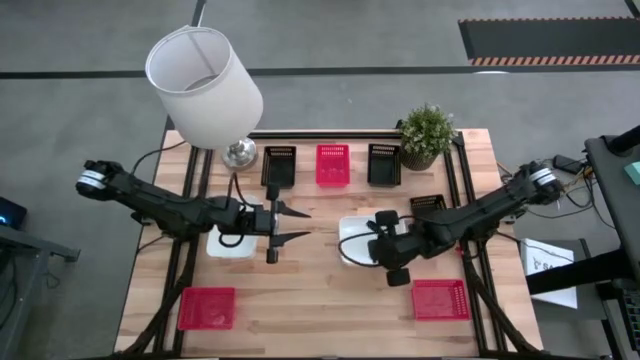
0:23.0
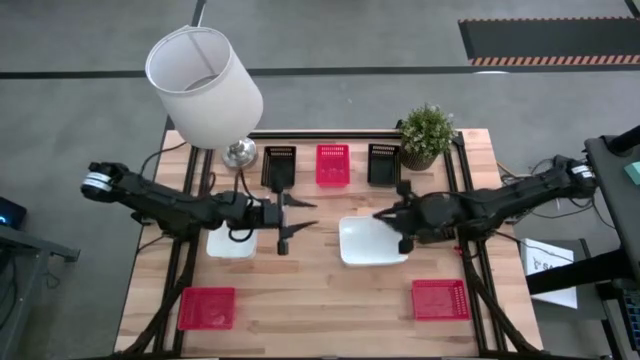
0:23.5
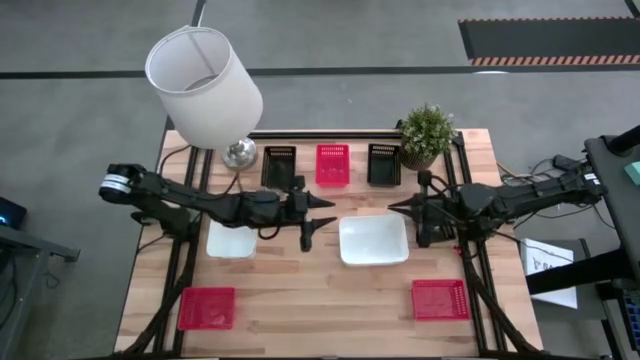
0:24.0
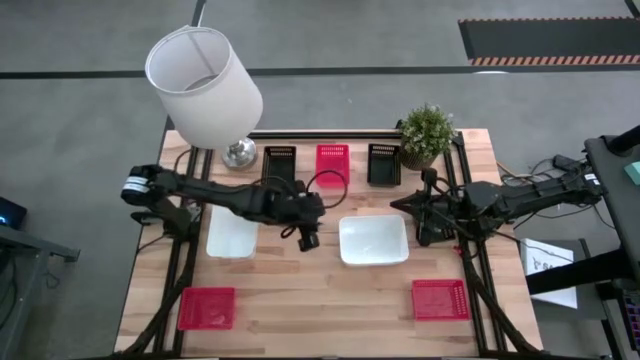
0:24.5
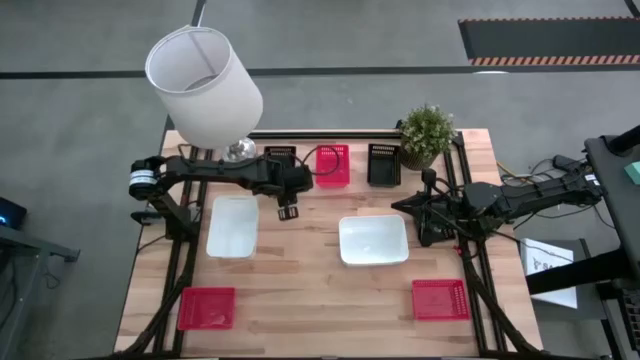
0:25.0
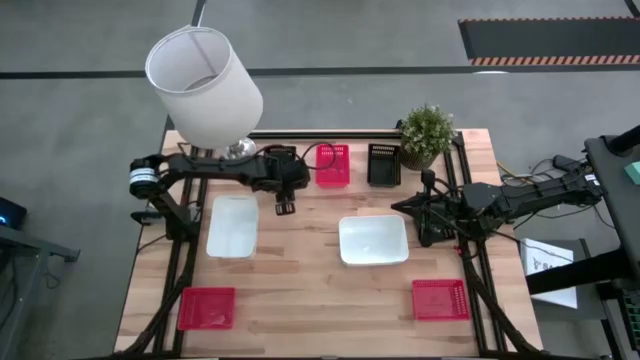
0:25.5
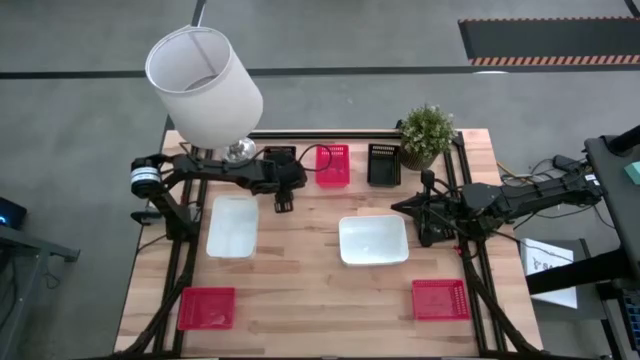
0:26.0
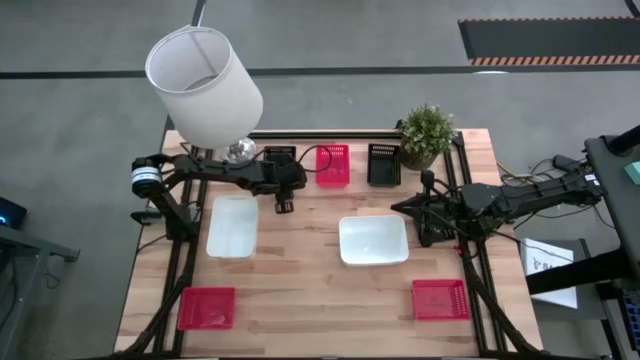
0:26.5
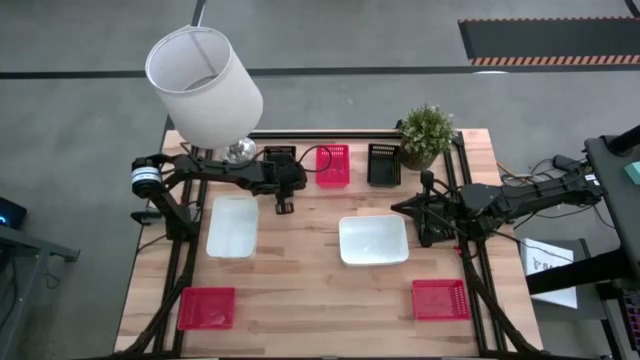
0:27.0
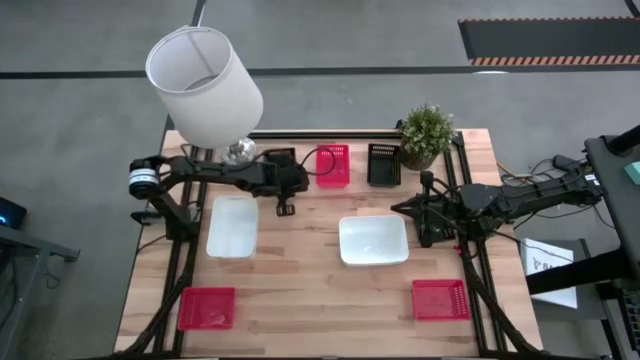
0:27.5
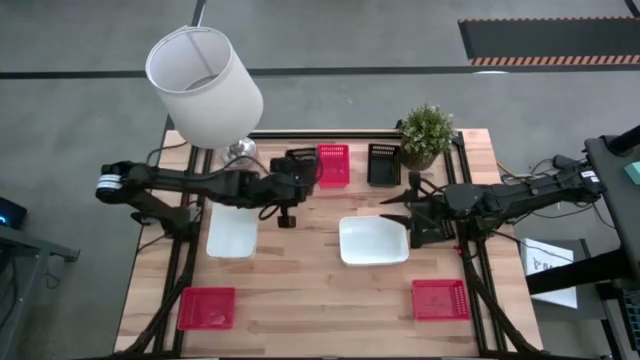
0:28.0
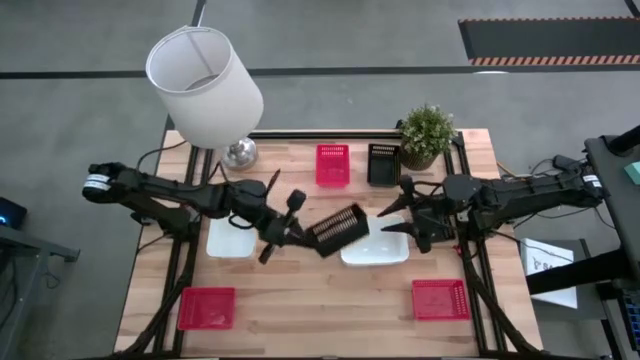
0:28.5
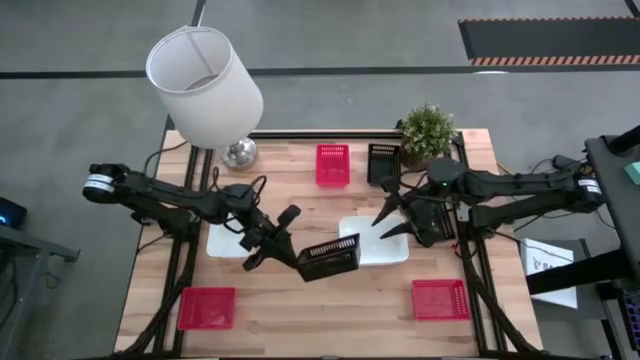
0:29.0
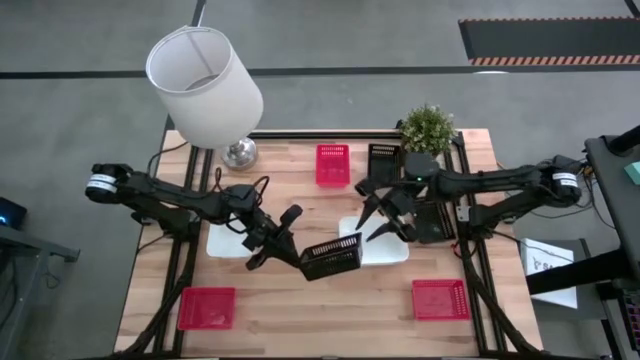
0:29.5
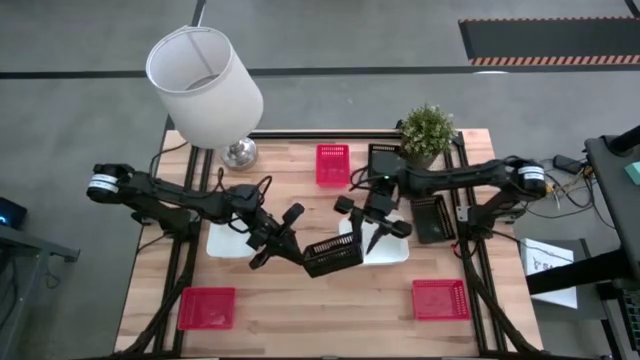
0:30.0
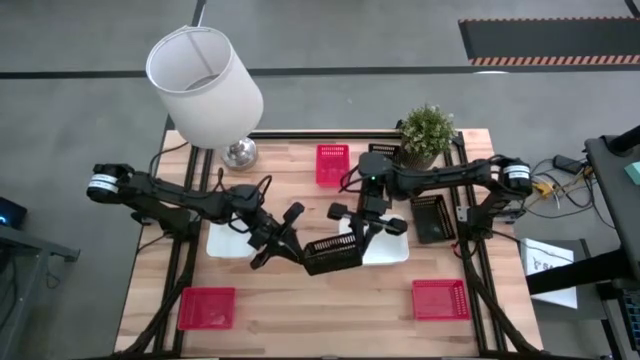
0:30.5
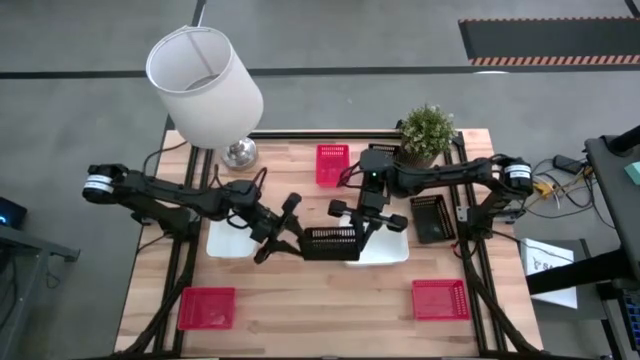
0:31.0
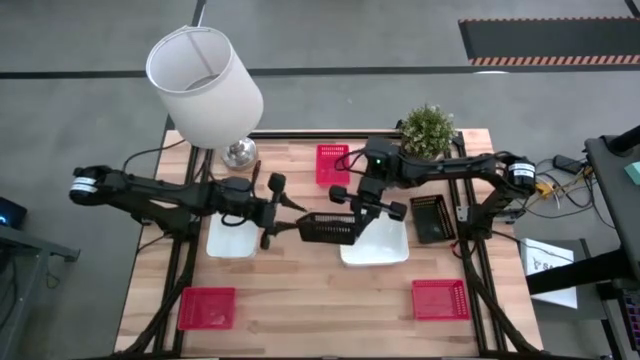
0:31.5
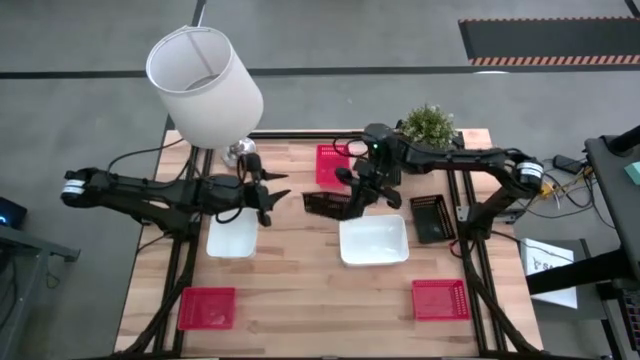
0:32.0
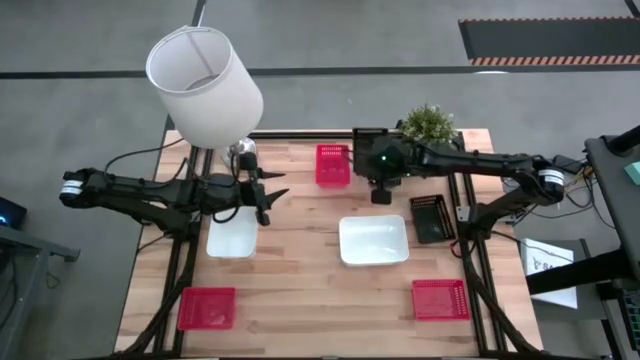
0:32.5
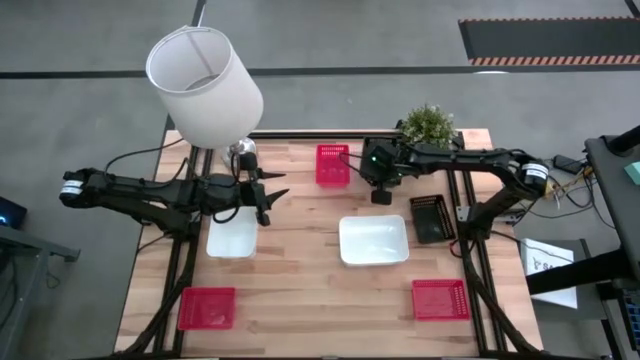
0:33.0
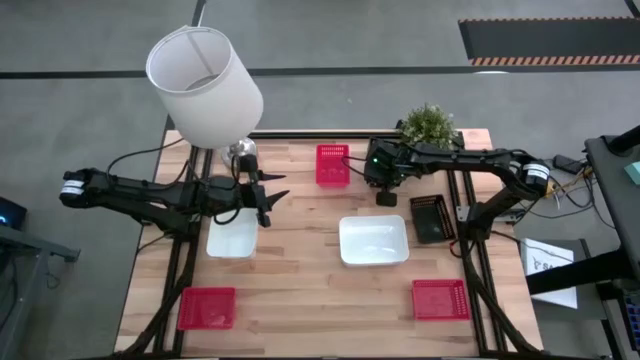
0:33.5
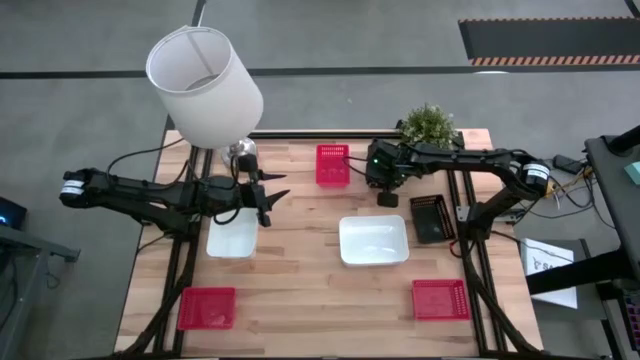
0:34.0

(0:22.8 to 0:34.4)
Stack the top left black bin into the top right black bin

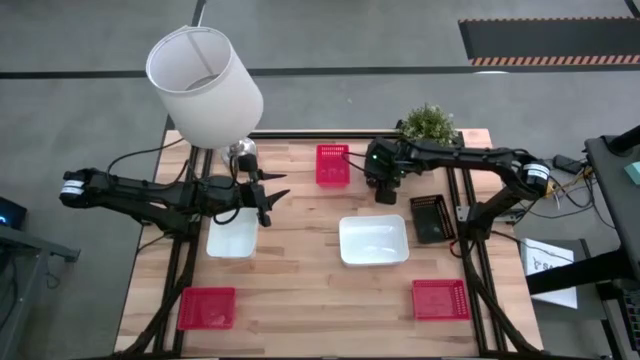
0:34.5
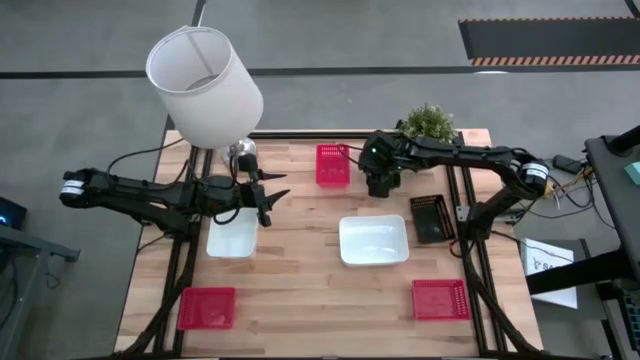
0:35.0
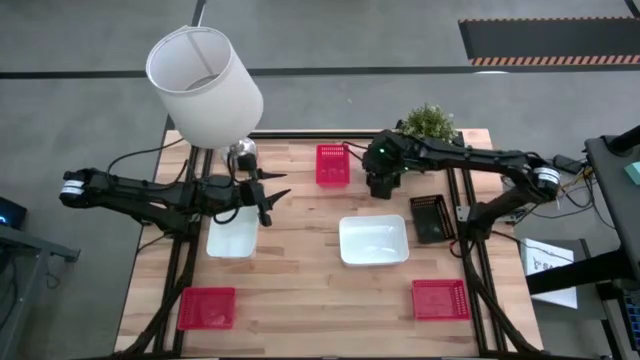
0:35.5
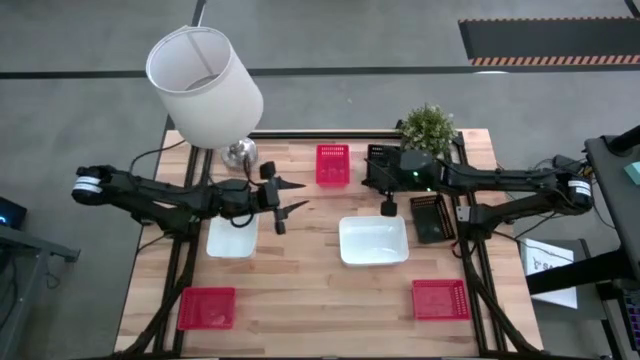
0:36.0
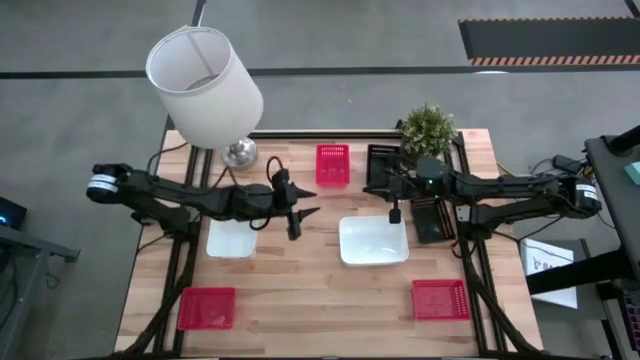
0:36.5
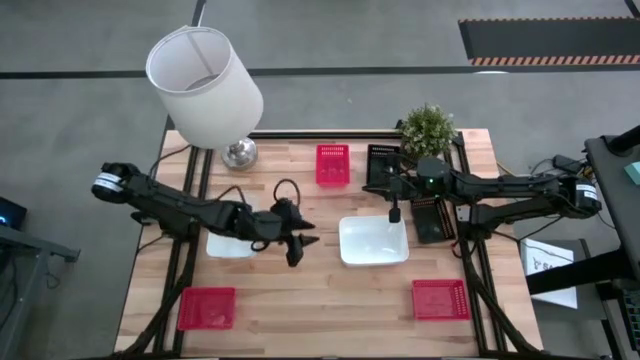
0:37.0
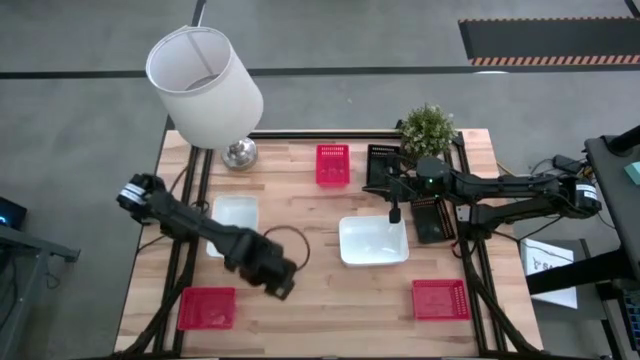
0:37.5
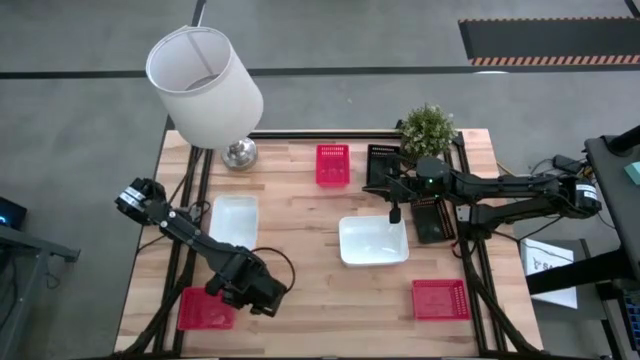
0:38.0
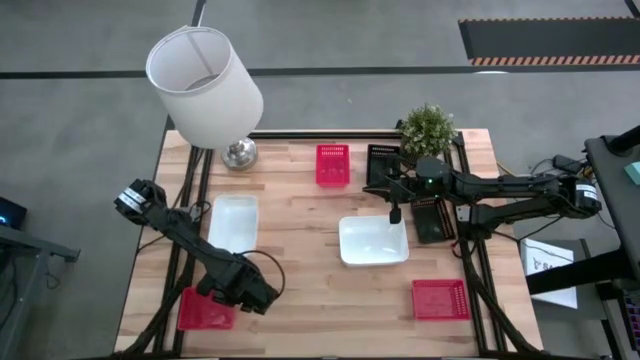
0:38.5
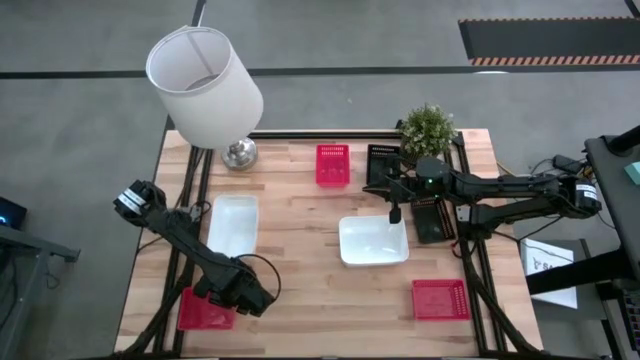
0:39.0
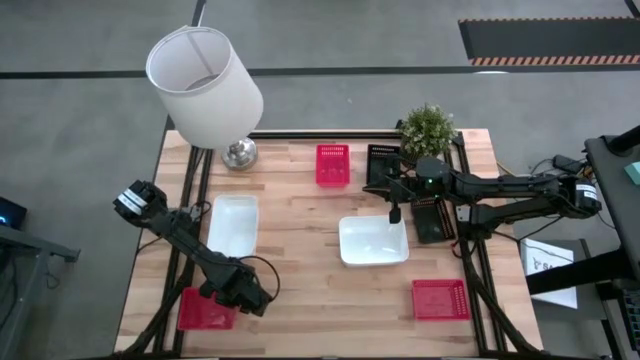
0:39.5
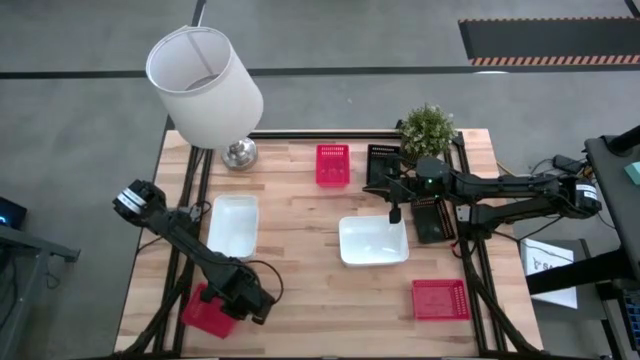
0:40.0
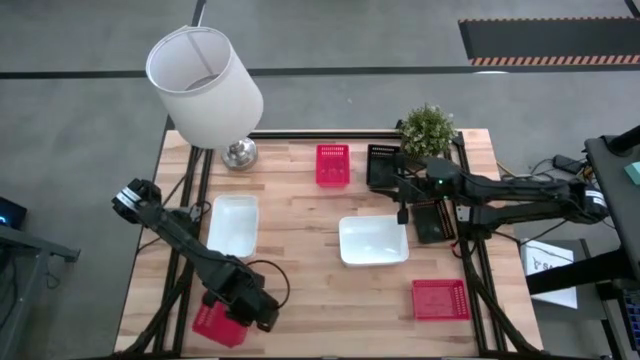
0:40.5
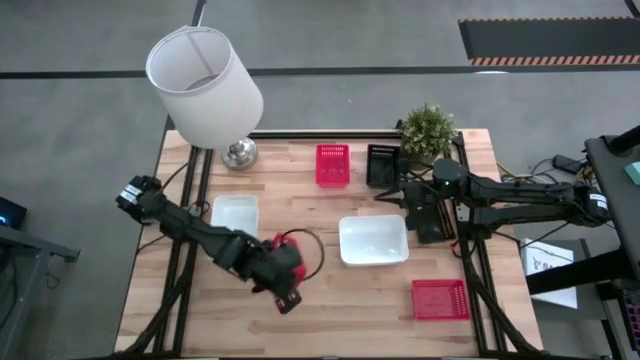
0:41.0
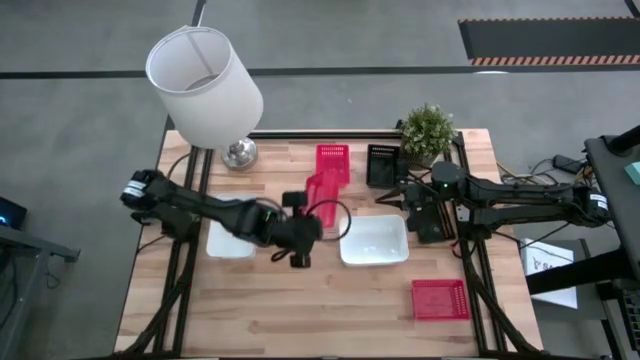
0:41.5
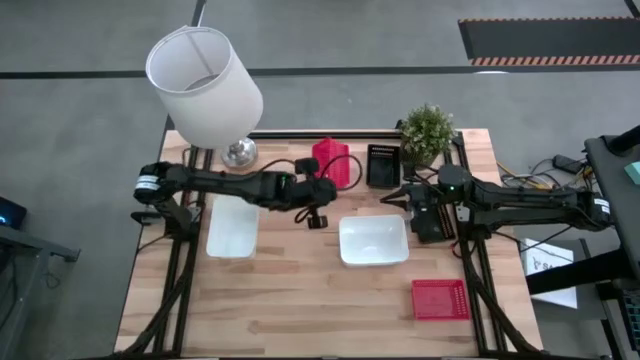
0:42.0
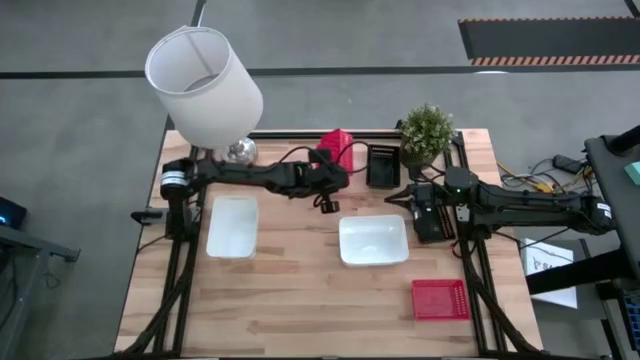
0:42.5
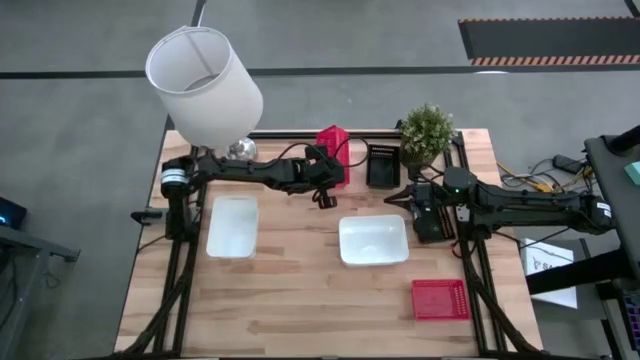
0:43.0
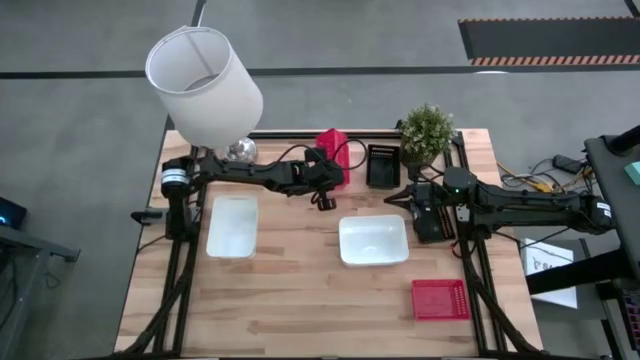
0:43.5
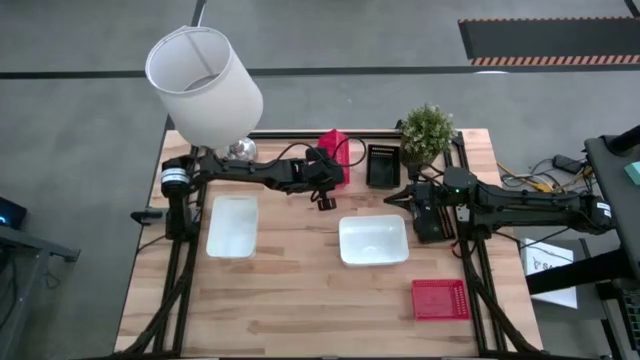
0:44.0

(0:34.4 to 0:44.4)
Stack the bottom left red bin into the top red bin
